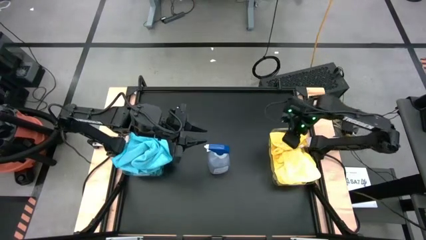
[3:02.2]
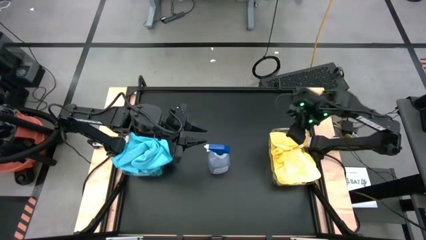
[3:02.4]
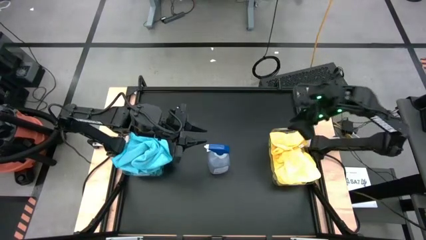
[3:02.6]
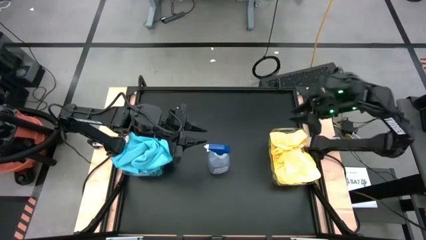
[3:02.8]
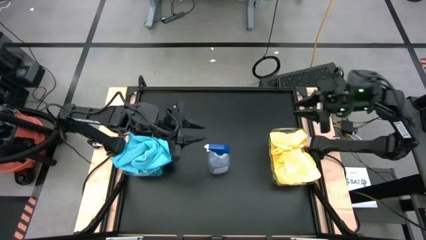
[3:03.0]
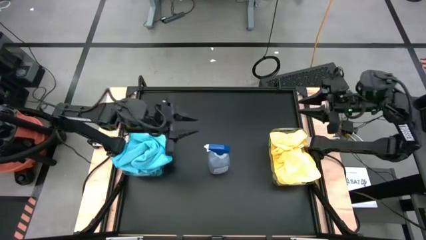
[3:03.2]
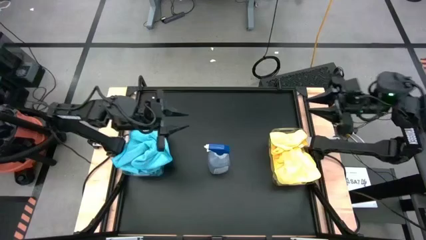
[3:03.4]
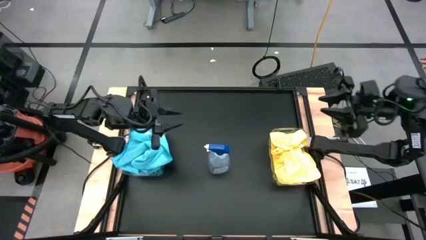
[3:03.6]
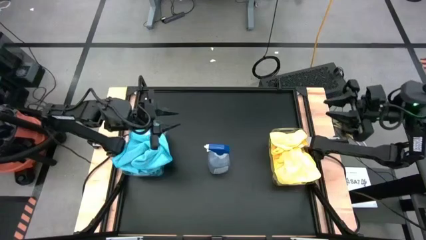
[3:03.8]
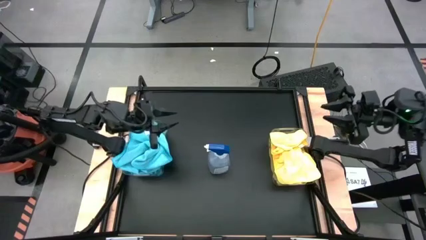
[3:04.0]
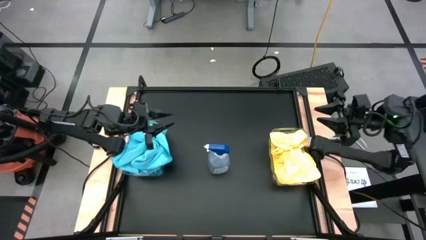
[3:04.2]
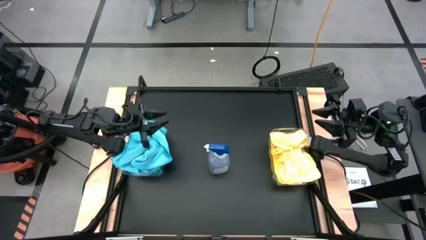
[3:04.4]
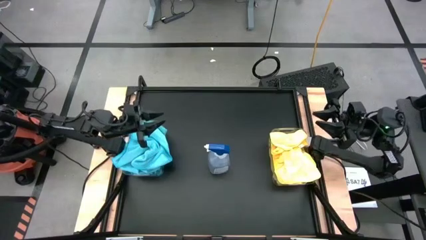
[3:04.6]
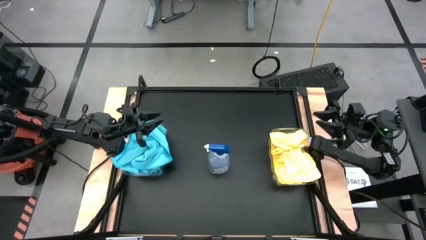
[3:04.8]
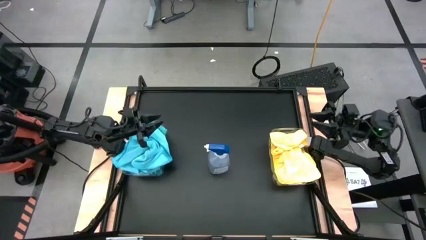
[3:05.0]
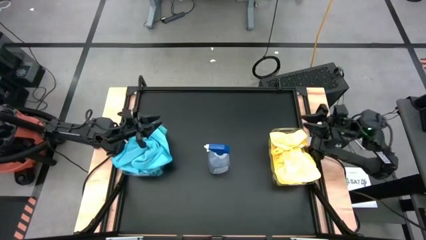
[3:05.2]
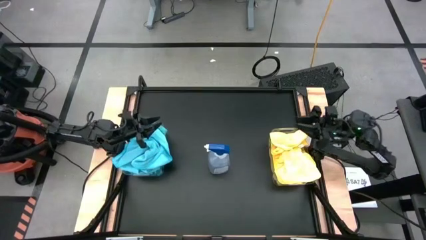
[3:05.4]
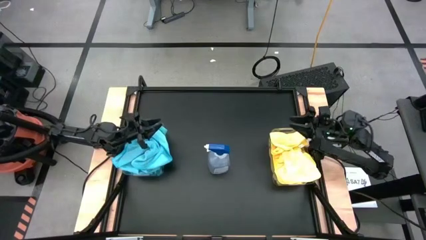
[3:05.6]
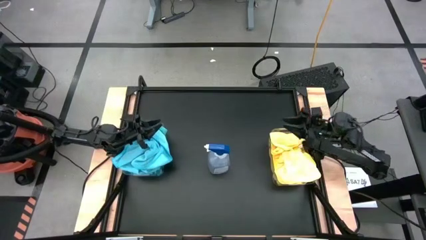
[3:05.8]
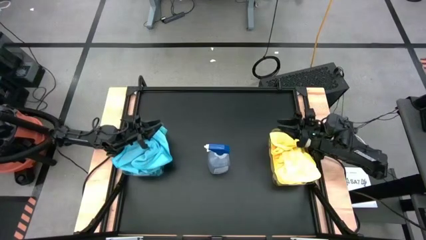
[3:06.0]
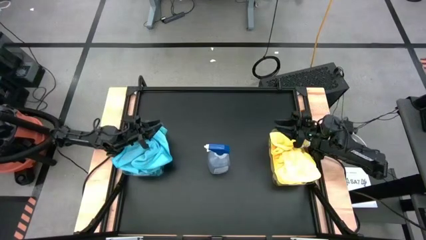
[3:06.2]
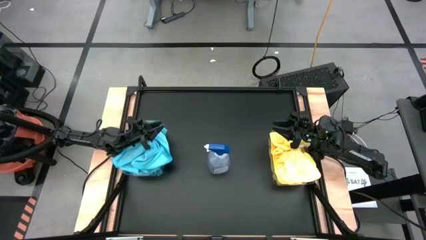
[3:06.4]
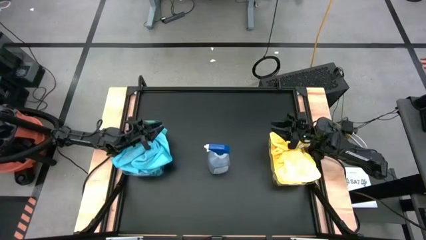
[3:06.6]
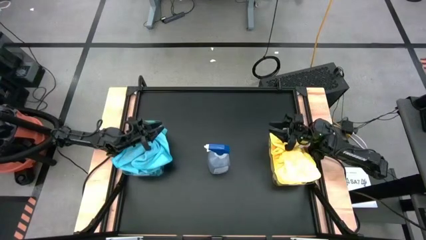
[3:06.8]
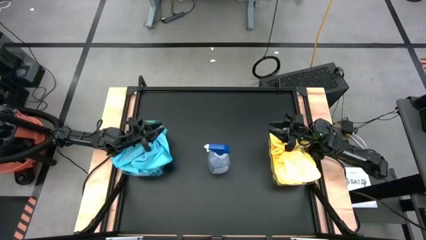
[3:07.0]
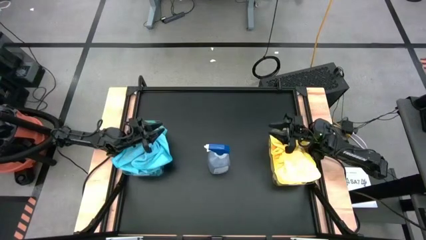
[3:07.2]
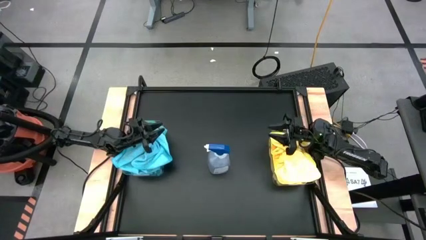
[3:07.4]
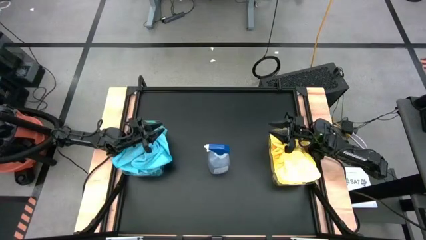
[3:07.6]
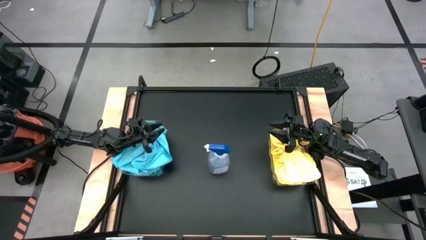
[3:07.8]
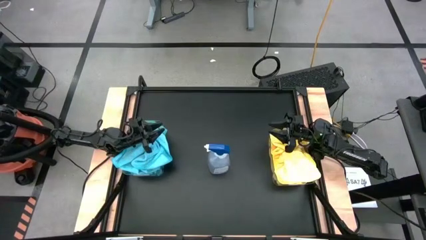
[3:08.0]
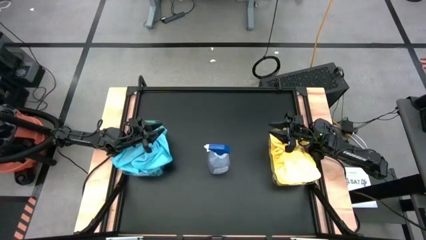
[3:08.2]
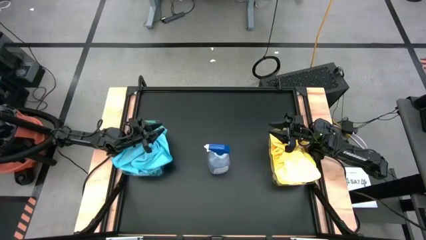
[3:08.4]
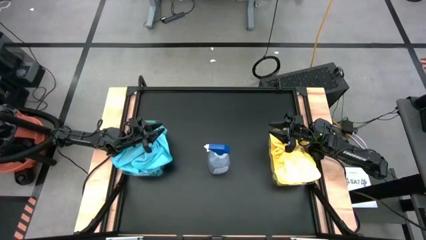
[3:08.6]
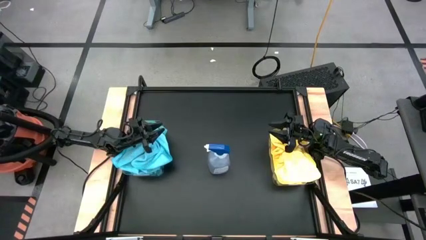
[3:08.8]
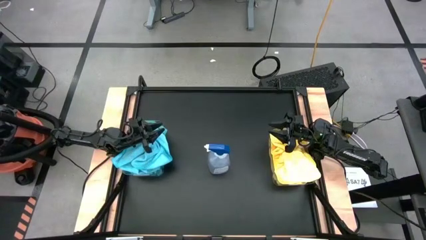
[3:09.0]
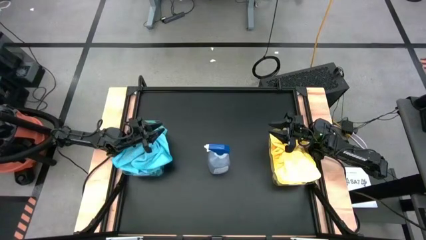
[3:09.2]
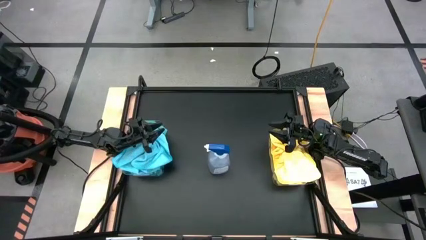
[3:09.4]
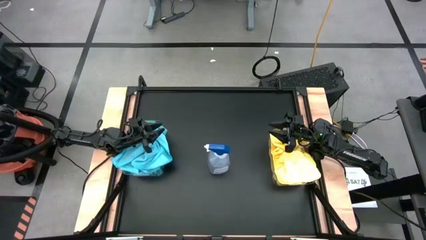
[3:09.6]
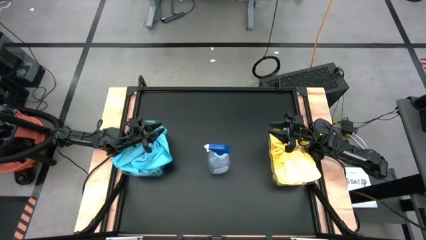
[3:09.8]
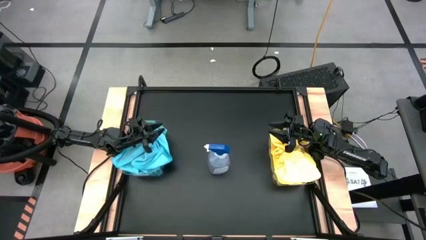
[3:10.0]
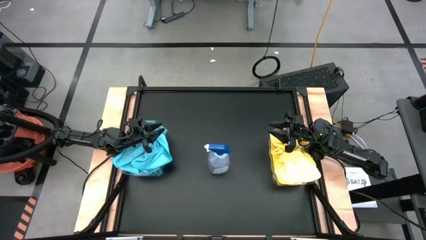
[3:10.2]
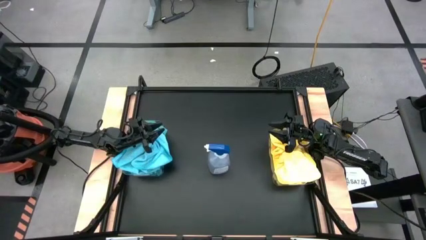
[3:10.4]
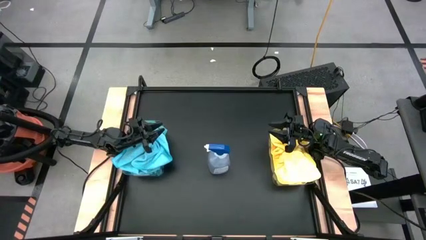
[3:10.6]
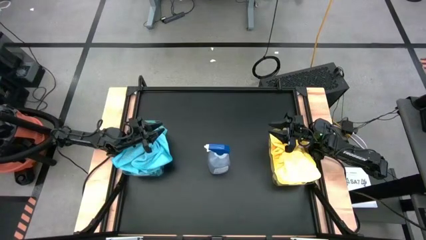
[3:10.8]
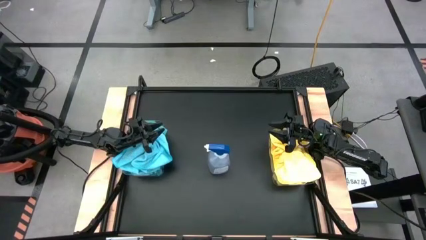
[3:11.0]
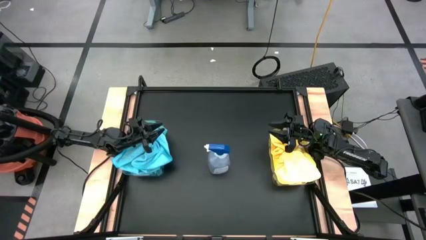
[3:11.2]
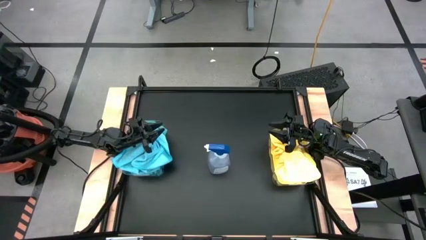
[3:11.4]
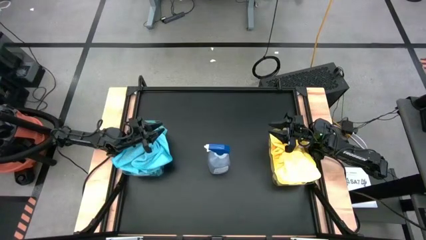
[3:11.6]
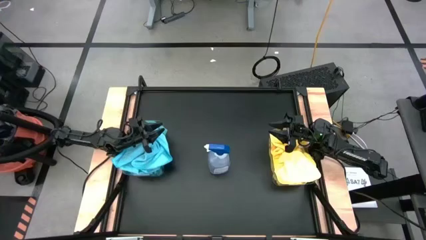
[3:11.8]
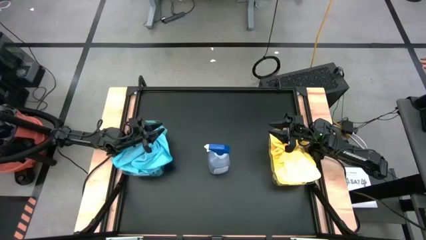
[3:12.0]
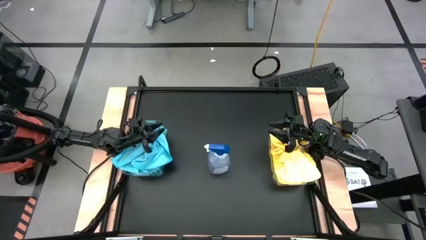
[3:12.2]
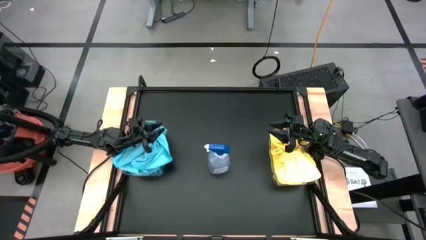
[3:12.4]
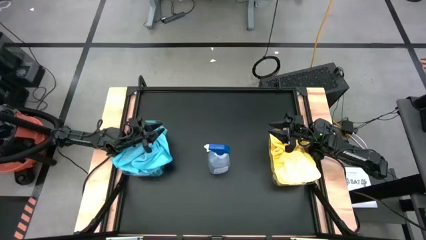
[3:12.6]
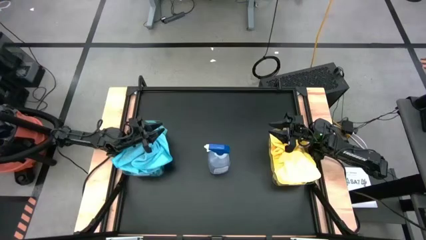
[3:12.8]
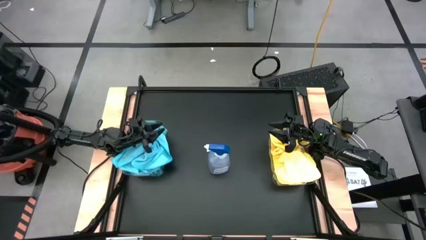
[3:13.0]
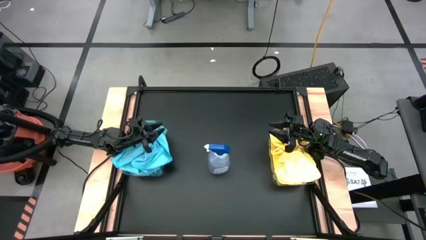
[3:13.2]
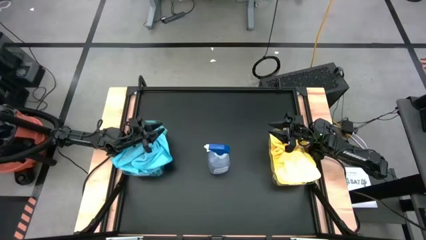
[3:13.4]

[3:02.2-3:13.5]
Task: Sort microfiber towel by color & place in baskets
Return to Home Position

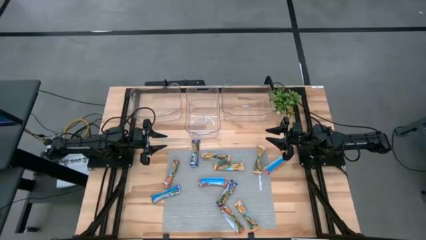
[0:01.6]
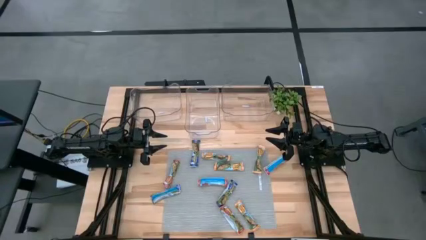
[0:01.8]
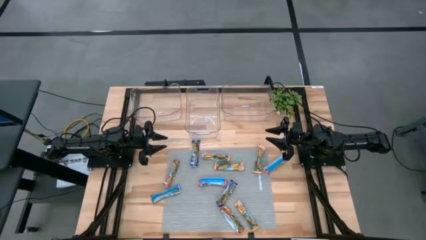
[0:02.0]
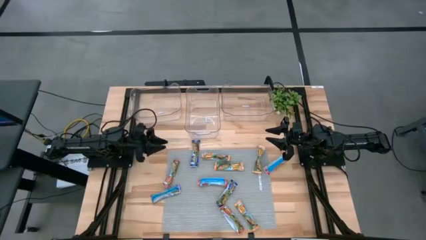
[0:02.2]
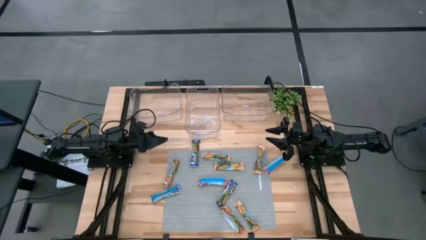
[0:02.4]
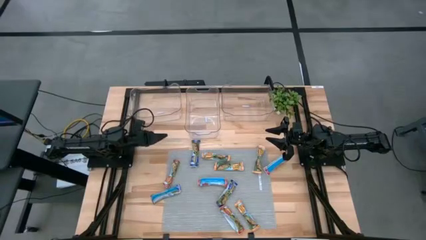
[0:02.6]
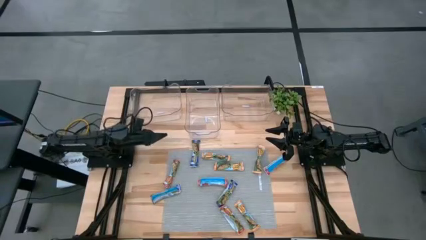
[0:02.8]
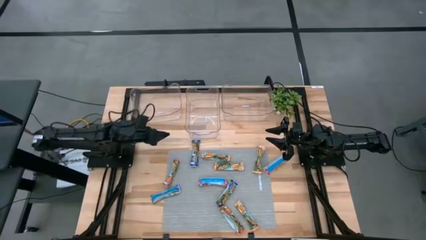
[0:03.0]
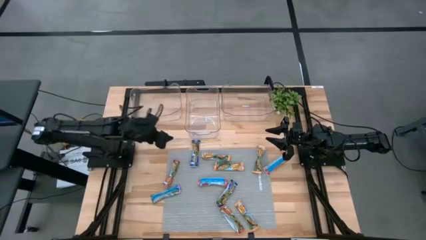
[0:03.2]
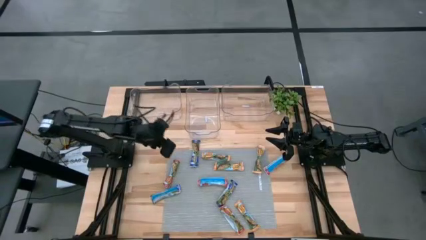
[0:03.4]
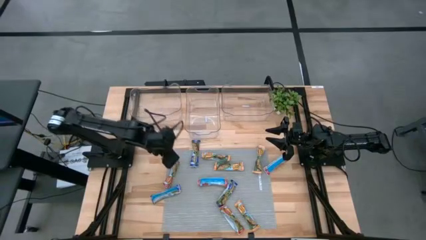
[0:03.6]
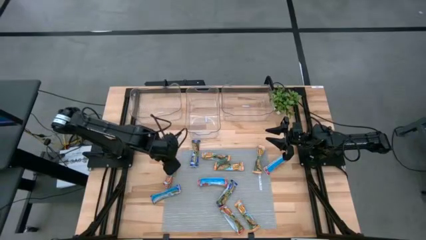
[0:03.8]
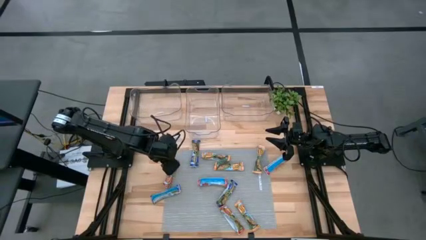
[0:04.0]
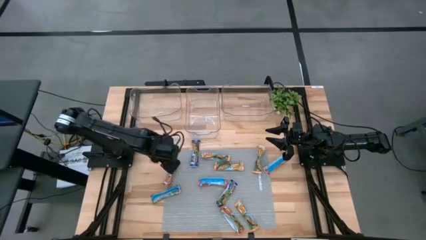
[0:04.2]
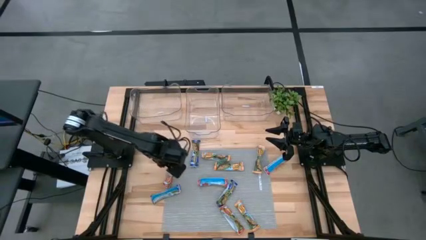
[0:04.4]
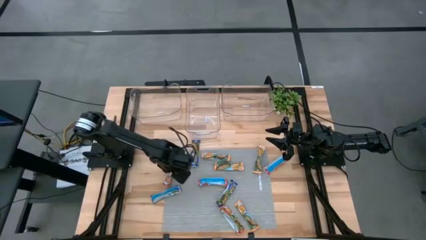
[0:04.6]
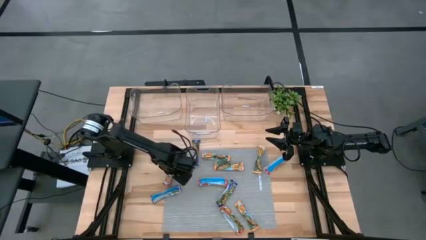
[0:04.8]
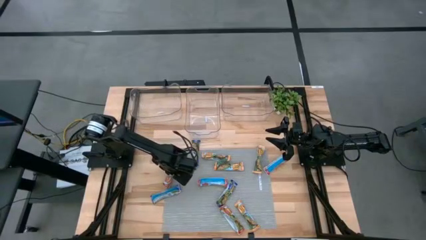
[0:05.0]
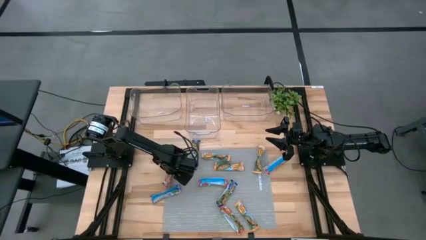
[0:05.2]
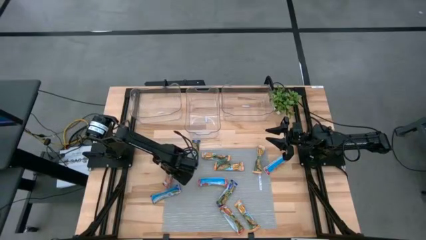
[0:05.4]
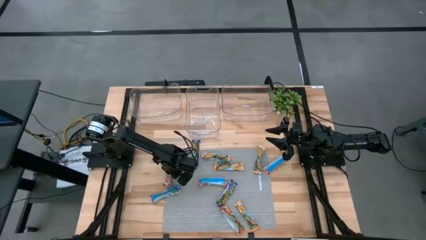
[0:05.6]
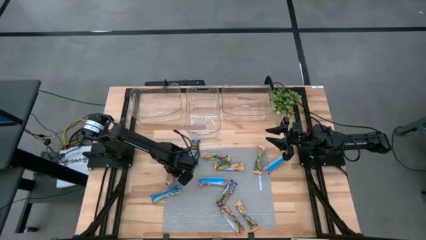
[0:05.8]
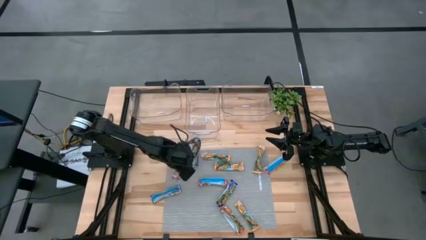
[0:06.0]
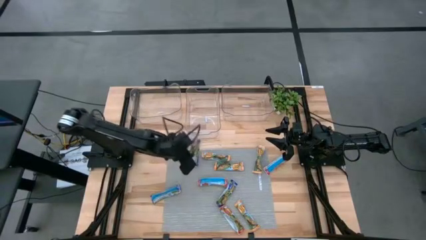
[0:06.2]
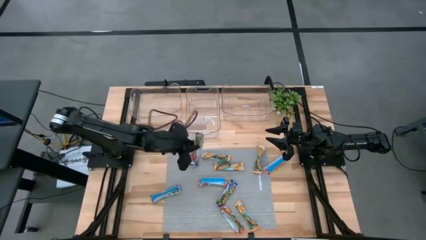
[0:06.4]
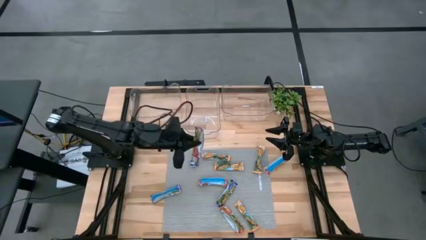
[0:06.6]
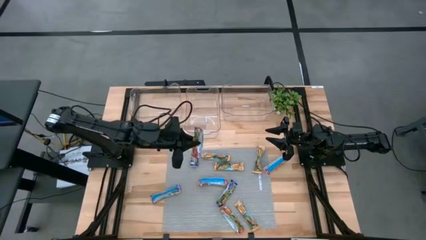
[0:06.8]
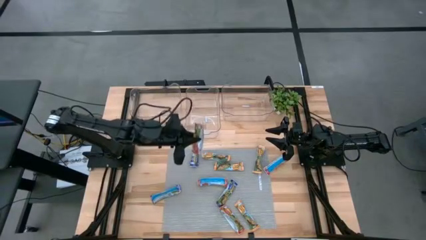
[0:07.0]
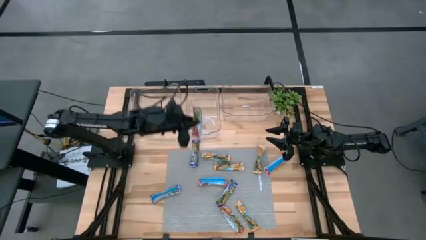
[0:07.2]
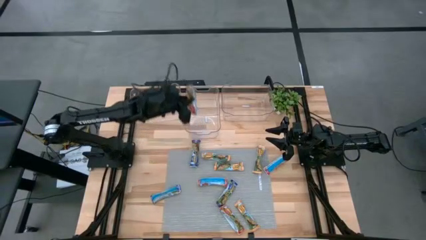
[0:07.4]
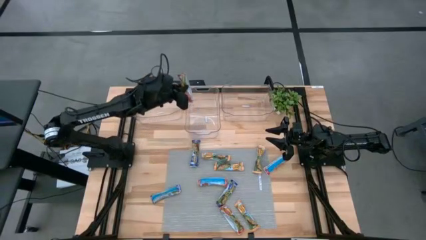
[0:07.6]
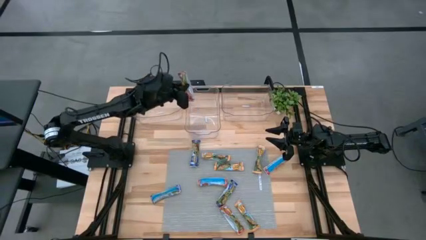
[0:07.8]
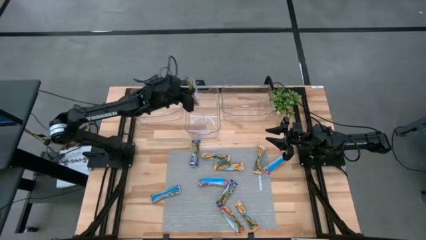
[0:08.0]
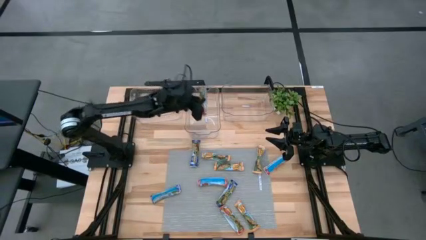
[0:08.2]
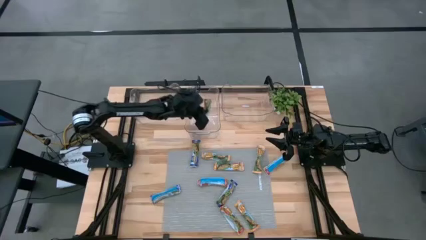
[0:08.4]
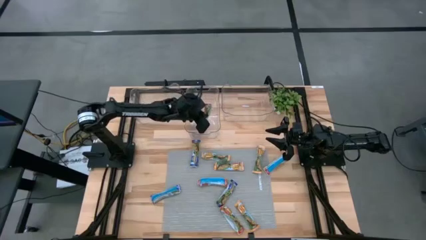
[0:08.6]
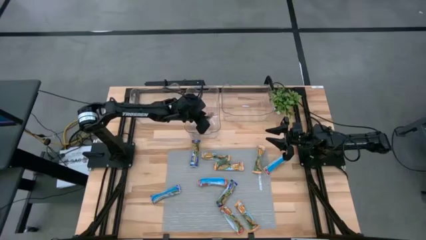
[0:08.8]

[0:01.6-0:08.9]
Task: Pick and place Granola Bars by type
Put the red granola bar into the middle transparent bin
